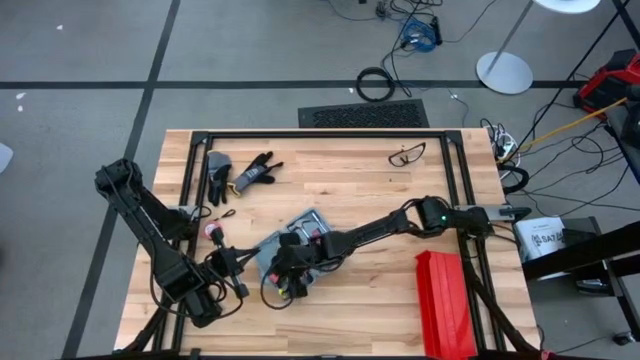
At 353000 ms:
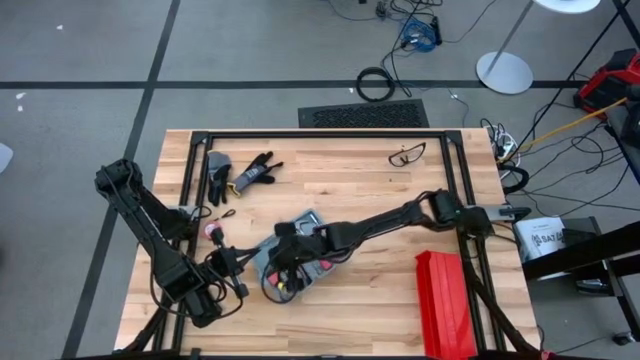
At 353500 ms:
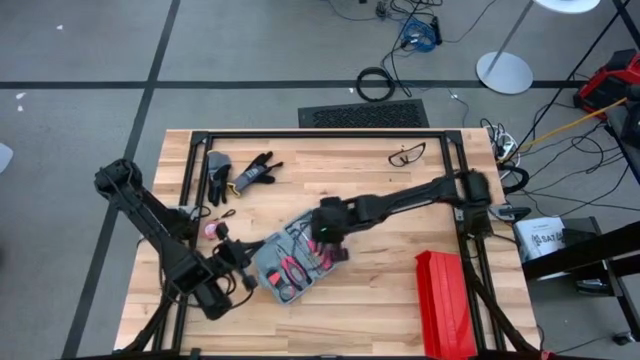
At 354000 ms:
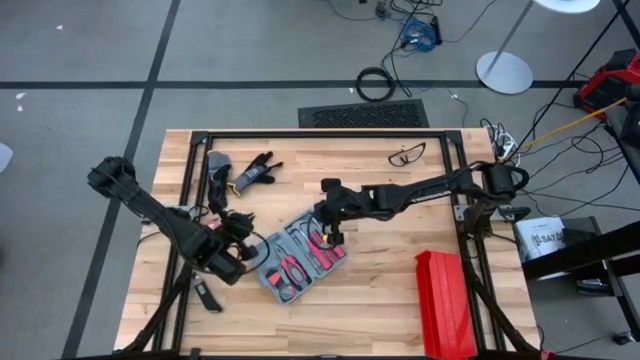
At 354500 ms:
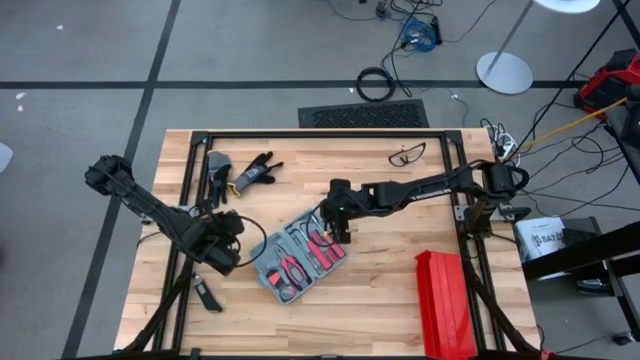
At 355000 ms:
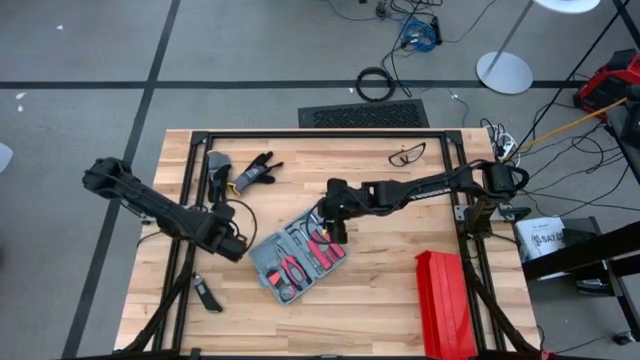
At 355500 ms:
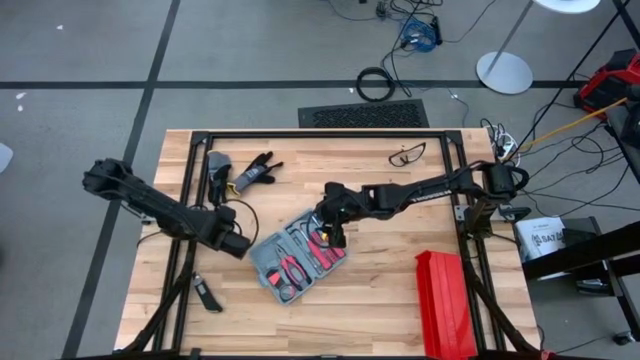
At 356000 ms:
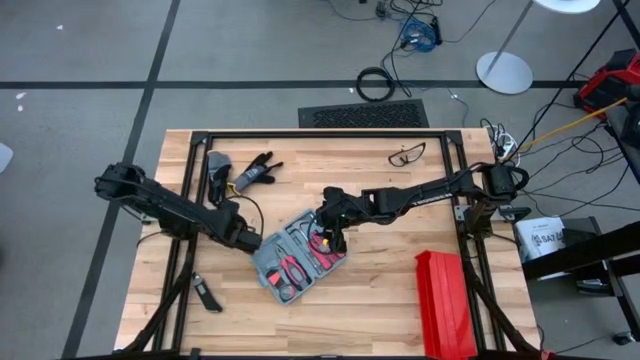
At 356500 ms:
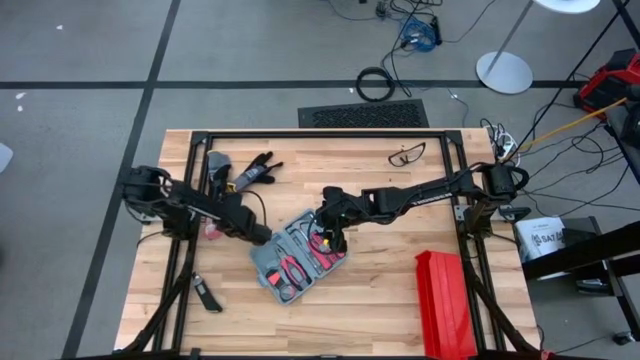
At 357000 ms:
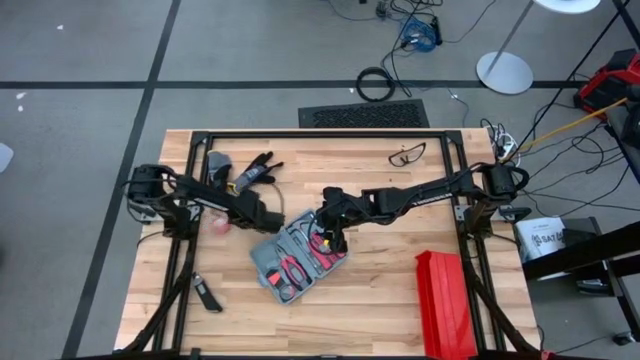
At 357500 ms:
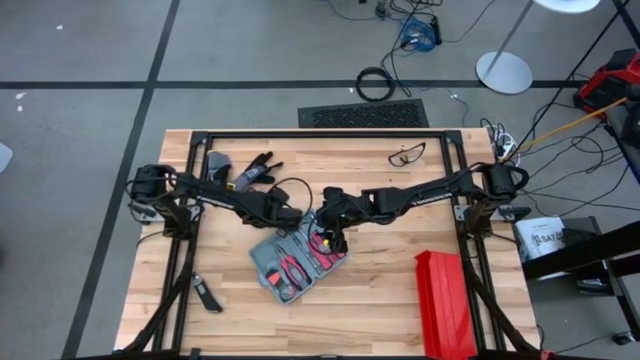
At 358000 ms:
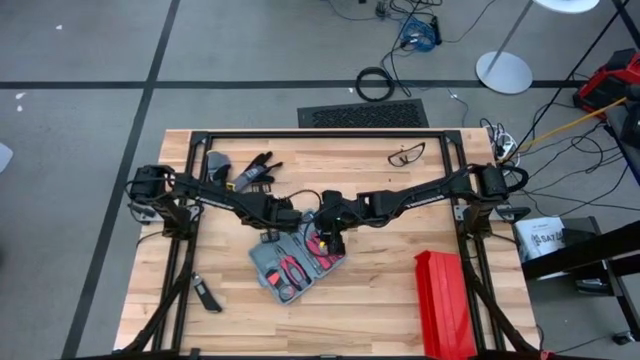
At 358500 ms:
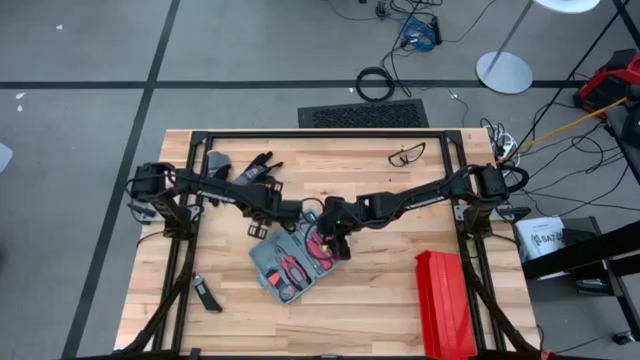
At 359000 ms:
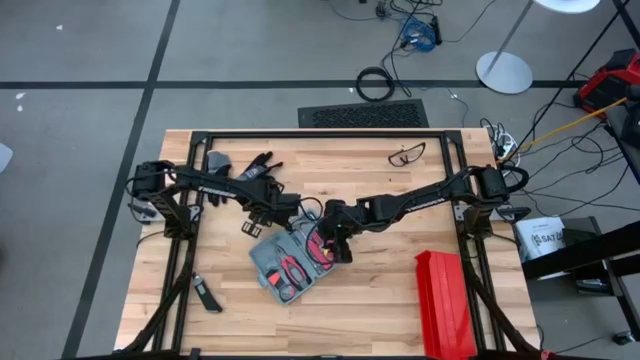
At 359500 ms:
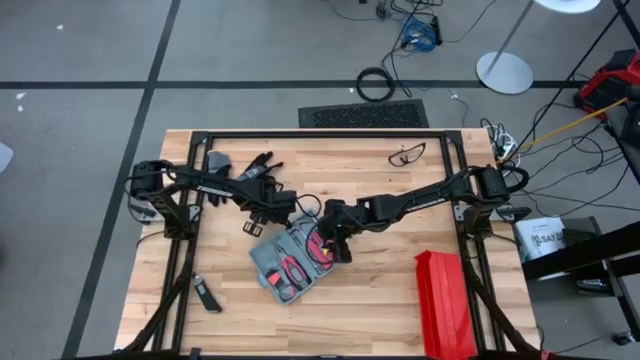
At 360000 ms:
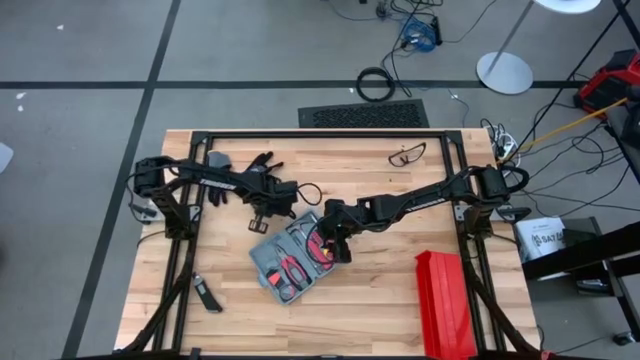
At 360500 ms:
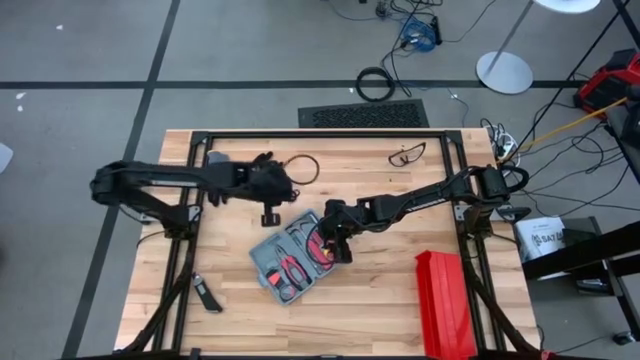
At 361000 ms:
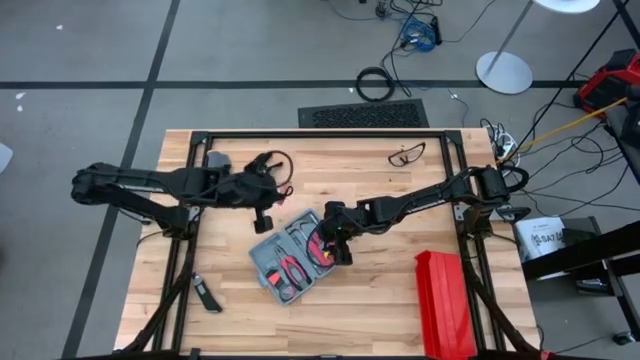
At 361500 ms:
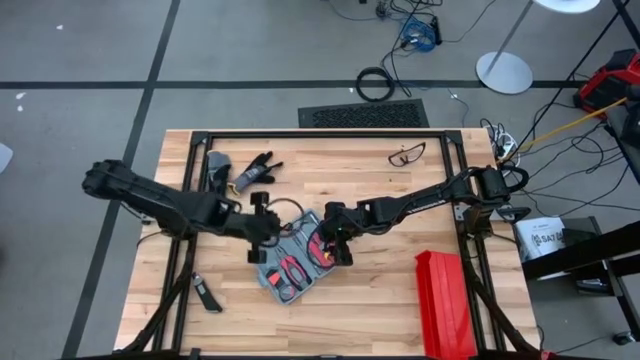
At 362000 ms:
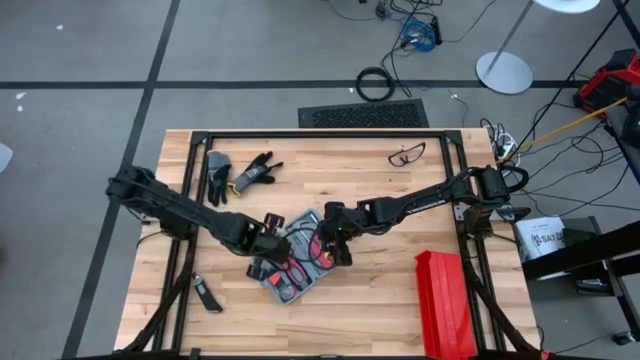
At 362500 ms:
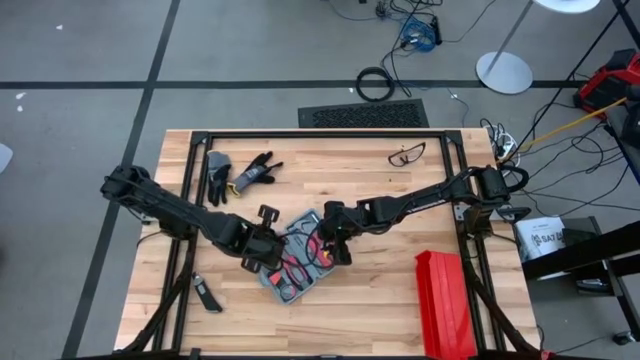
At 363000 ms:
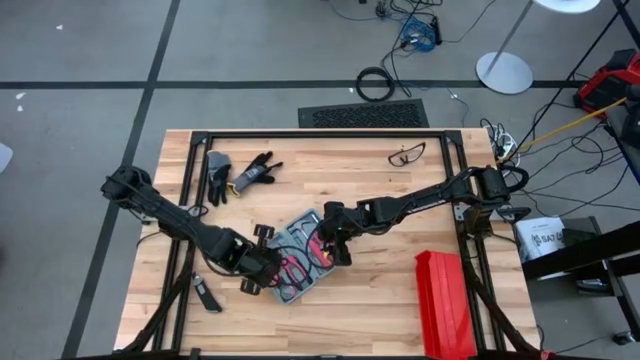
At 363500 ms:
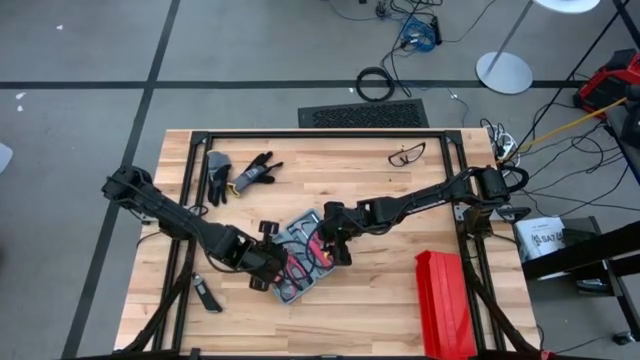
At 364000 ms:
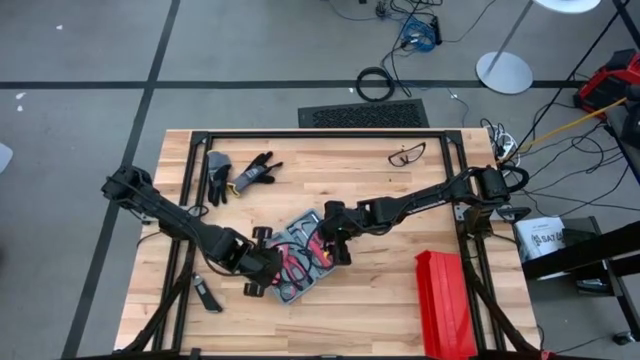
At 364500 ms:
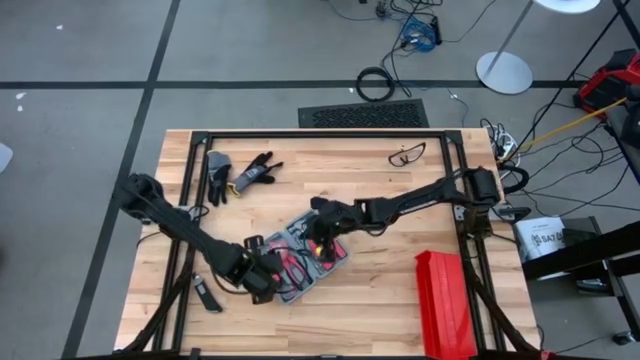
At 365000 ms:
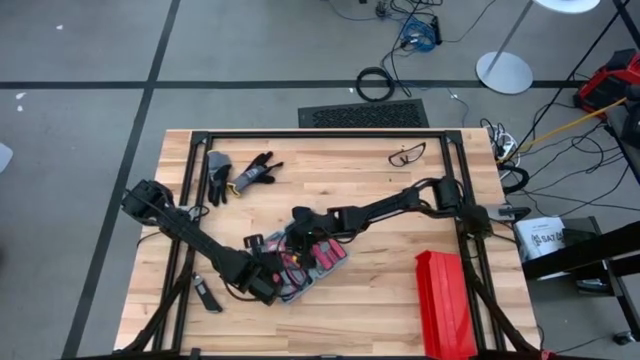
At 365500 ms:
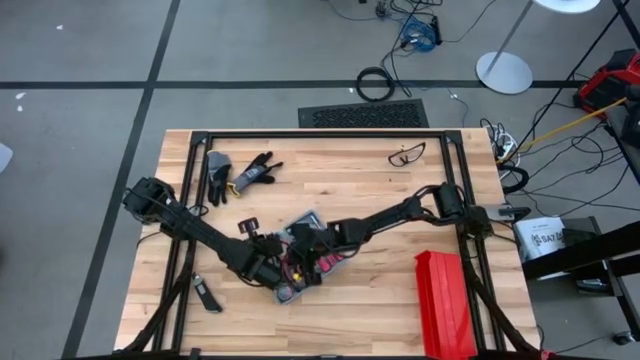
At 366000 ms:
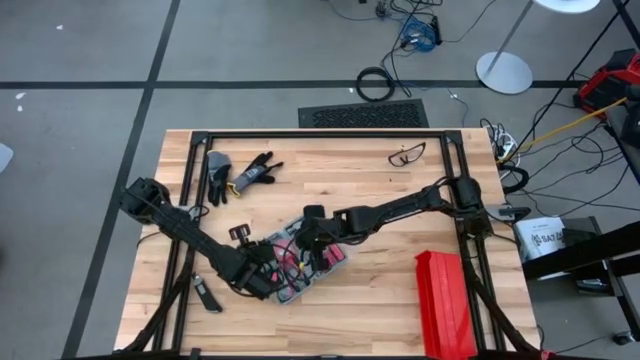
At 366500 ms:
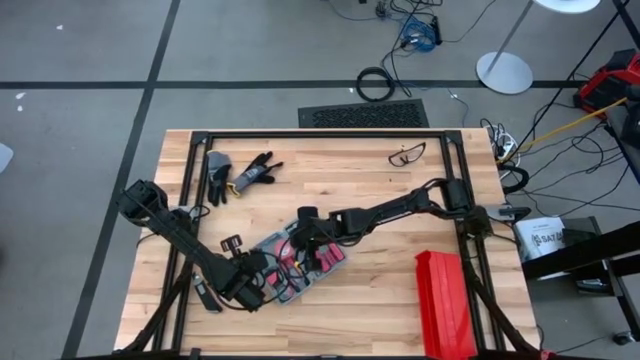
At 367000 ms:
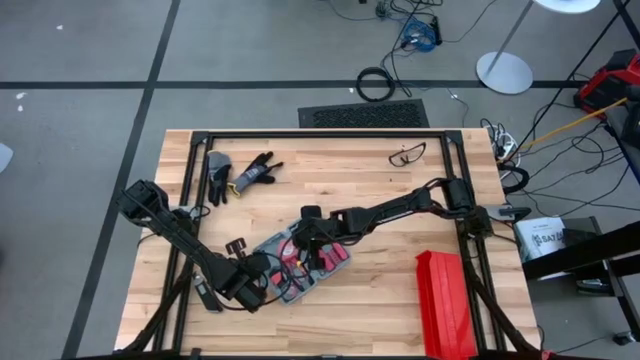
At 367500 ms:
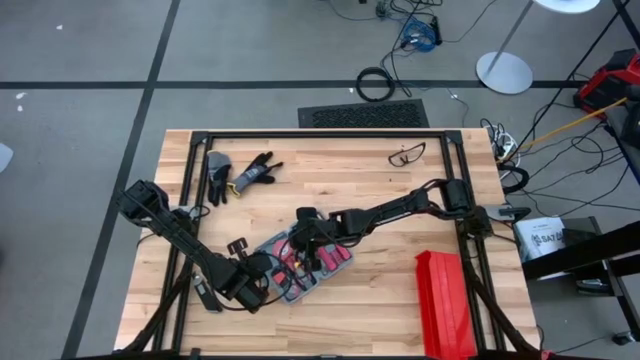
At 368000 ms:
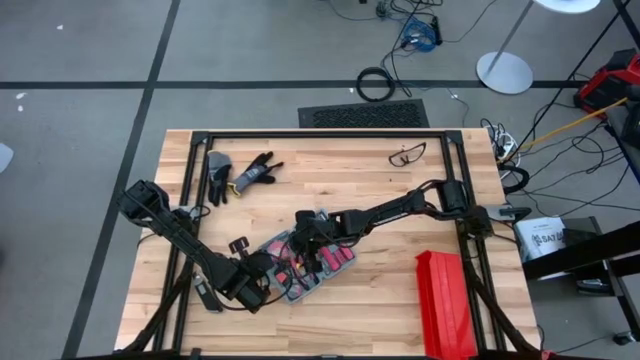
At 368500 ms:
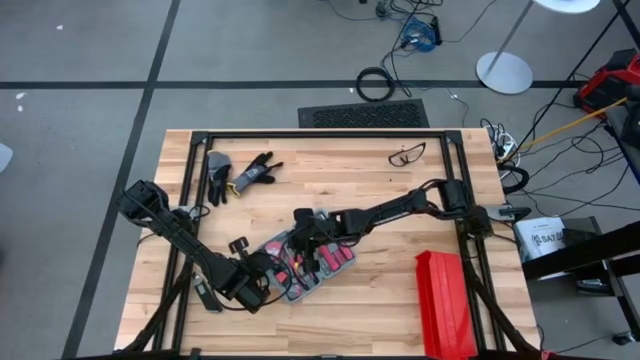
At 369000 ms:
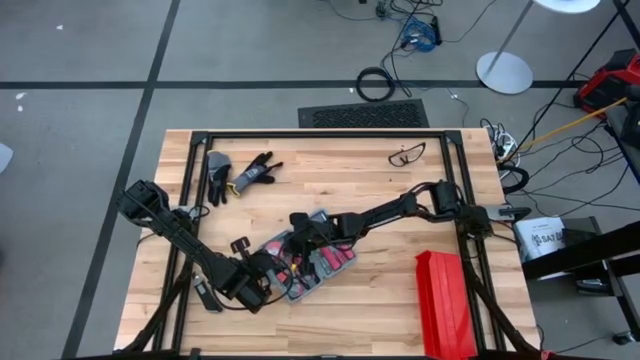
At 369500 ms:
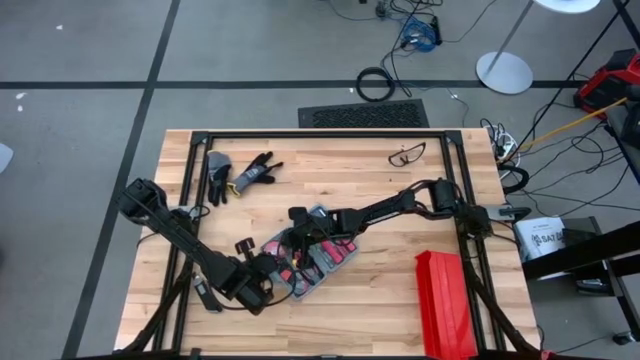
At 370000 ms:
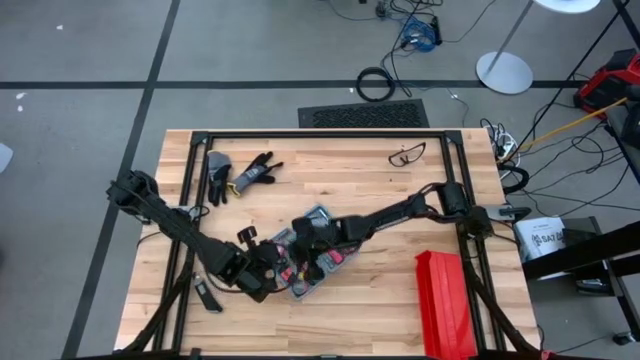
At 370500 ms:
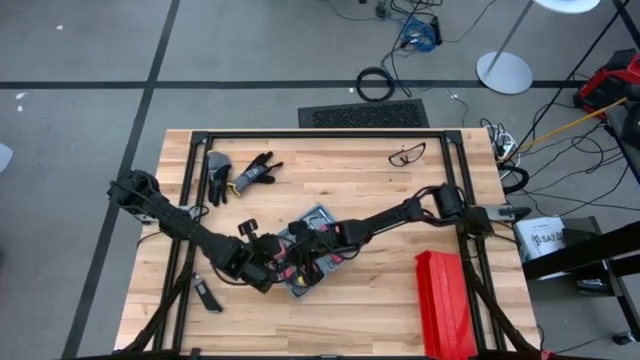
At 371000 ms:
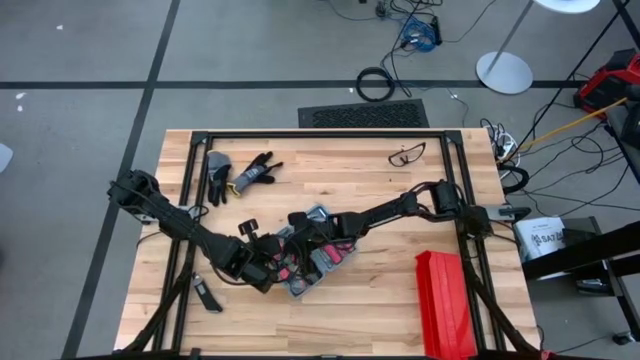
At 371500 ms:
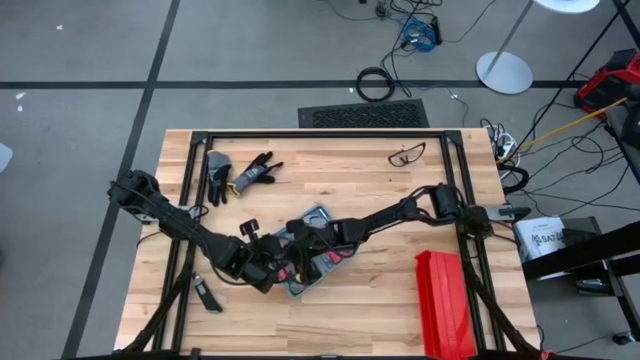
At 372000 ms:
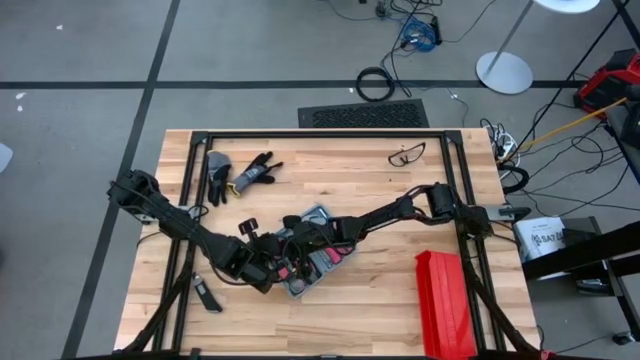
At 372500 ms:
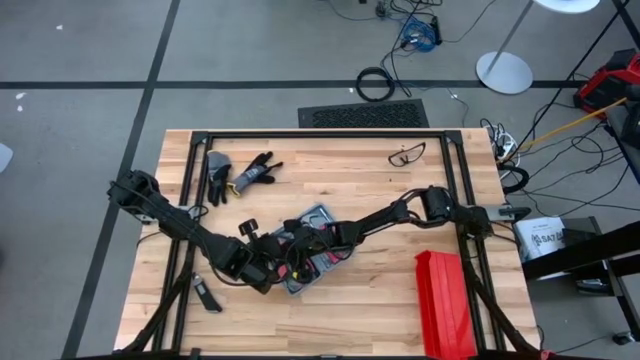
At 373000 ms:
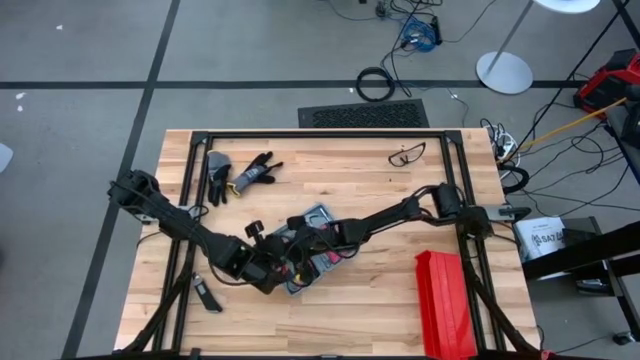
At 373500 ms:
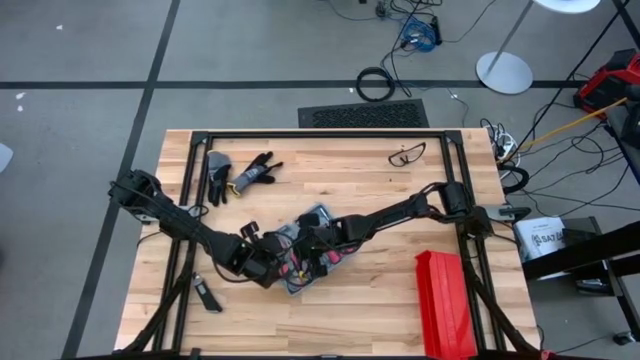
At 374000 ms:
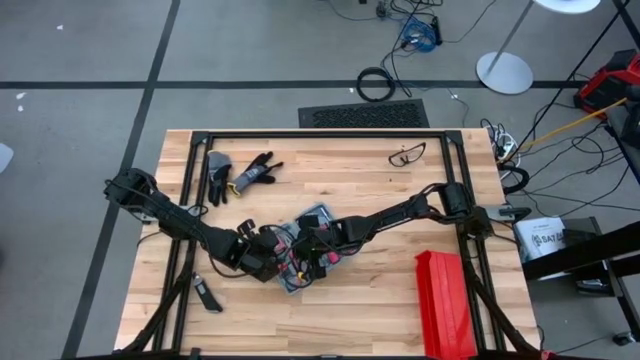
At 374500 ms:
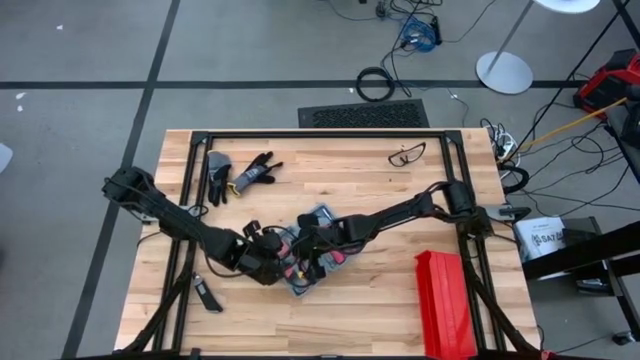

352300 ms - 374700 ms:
Task: prefit tool cases
Put the red tape measure into the gray prefit tools case
